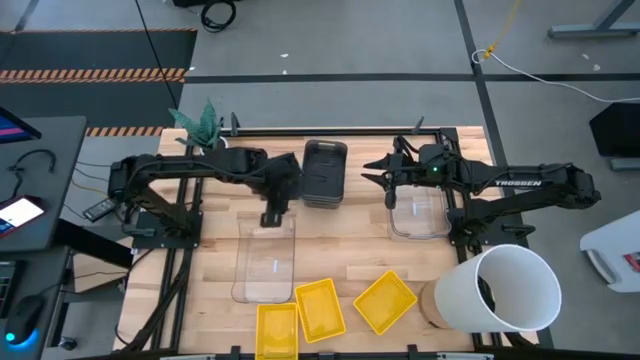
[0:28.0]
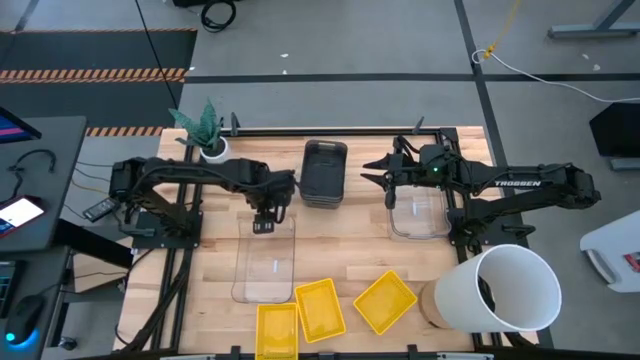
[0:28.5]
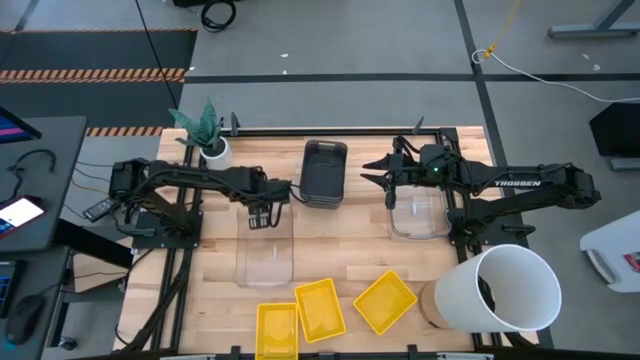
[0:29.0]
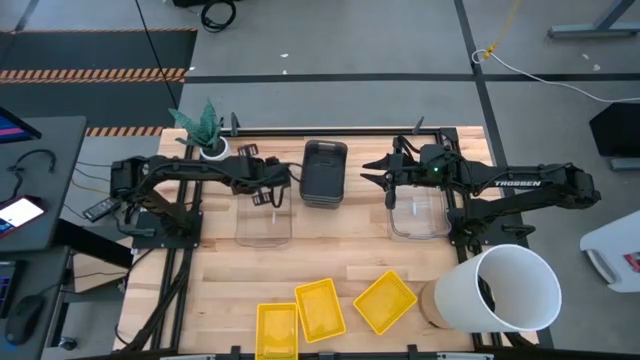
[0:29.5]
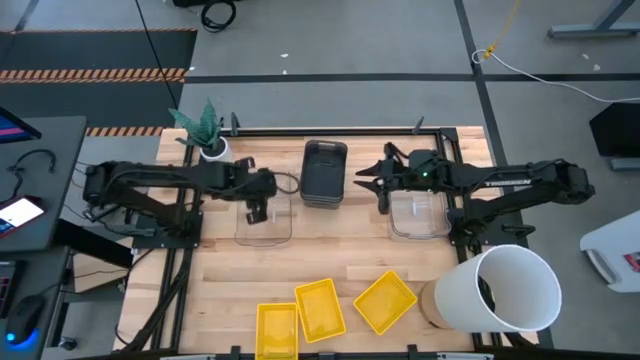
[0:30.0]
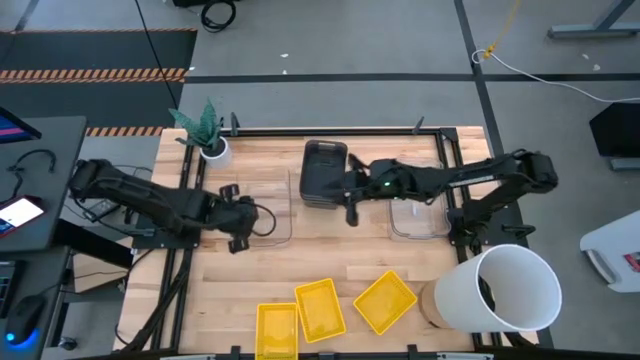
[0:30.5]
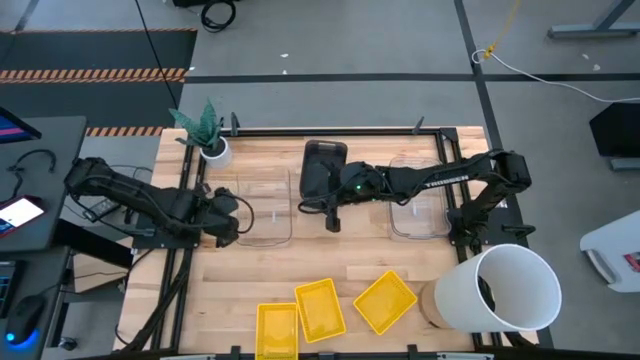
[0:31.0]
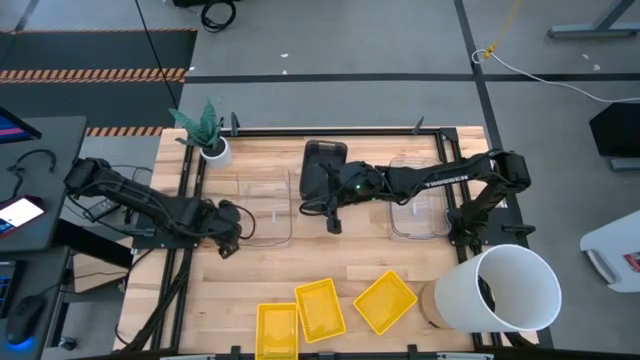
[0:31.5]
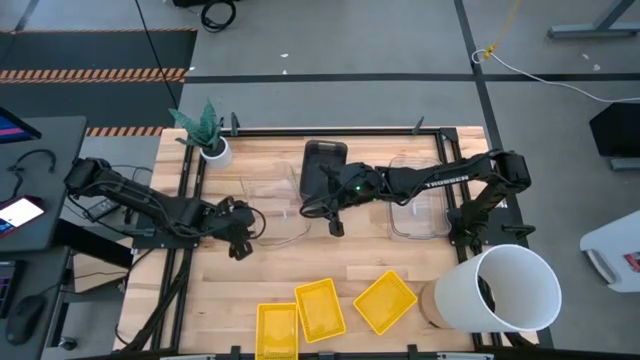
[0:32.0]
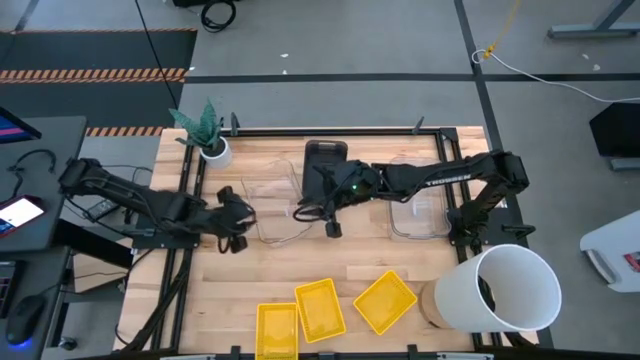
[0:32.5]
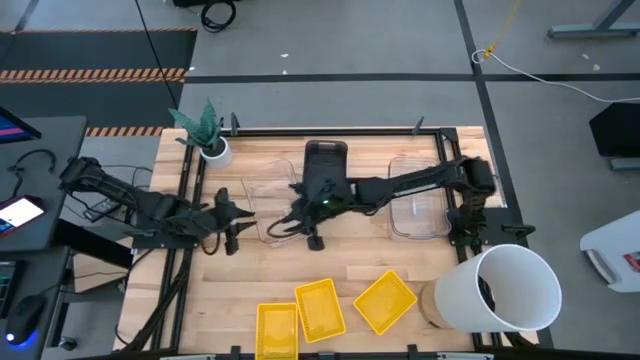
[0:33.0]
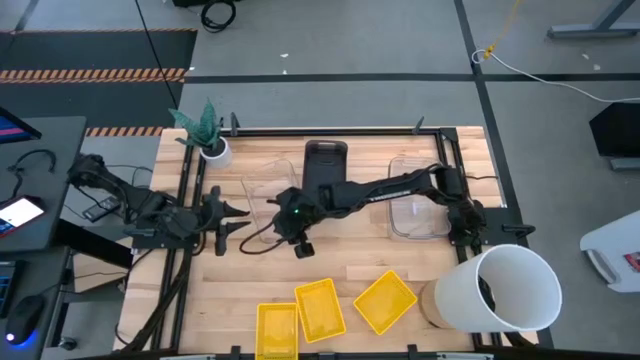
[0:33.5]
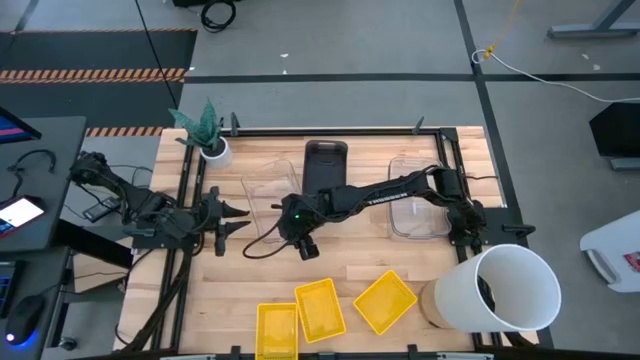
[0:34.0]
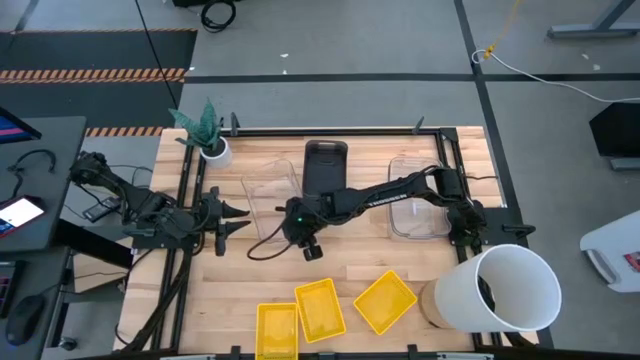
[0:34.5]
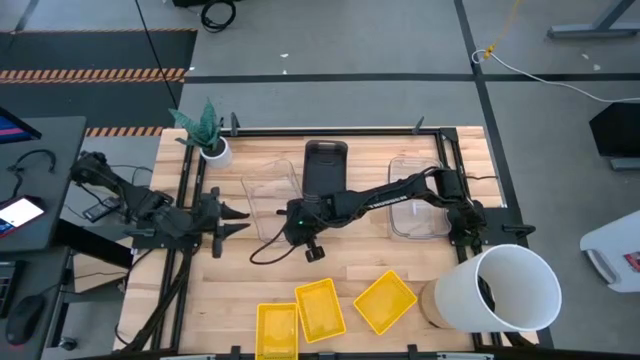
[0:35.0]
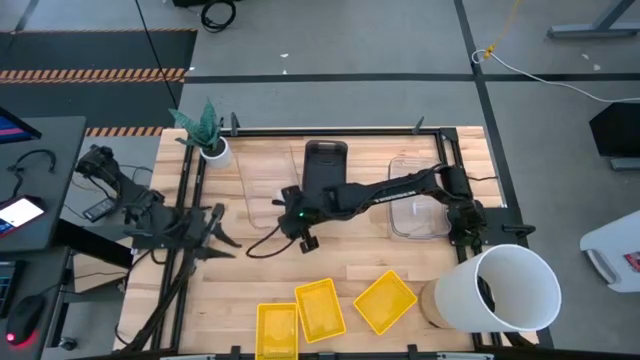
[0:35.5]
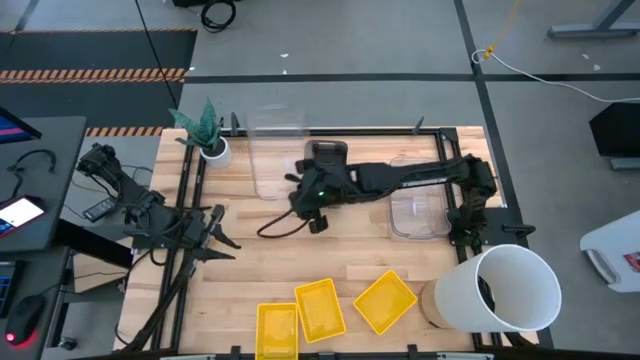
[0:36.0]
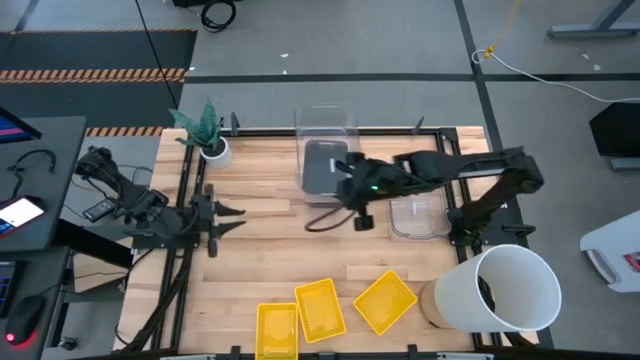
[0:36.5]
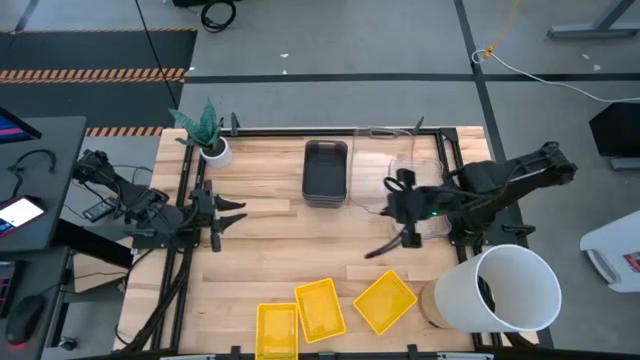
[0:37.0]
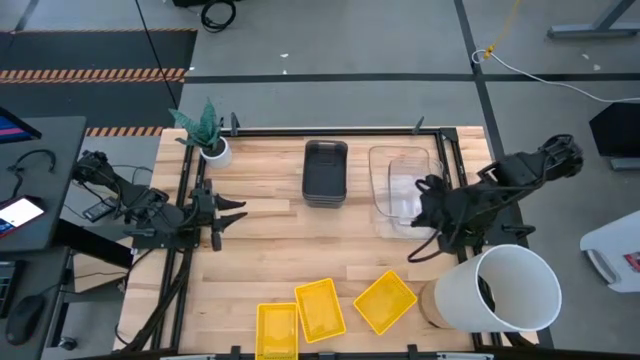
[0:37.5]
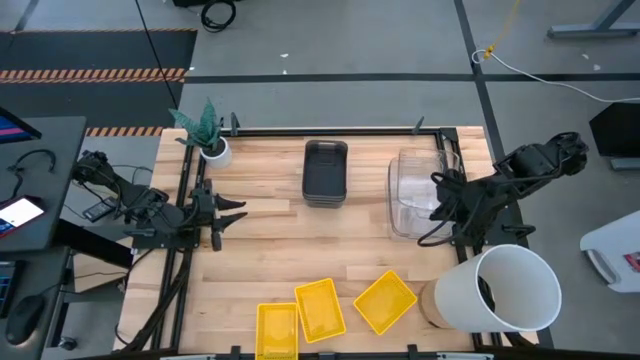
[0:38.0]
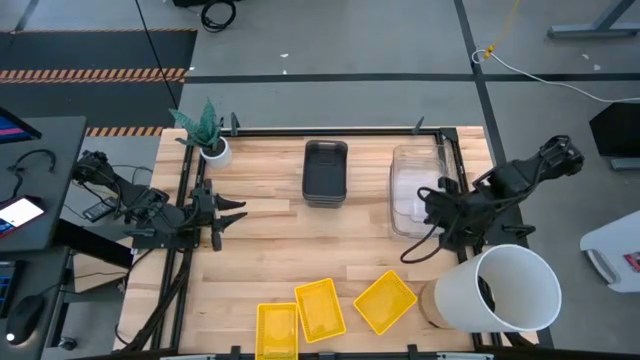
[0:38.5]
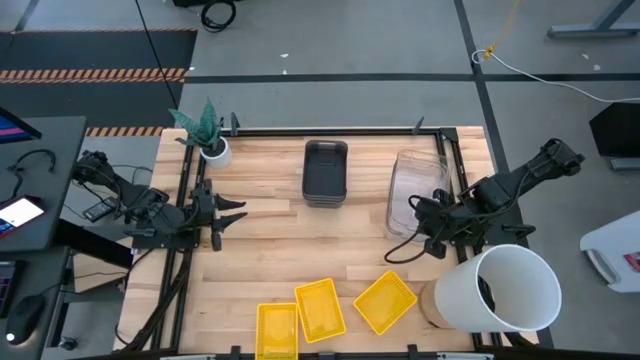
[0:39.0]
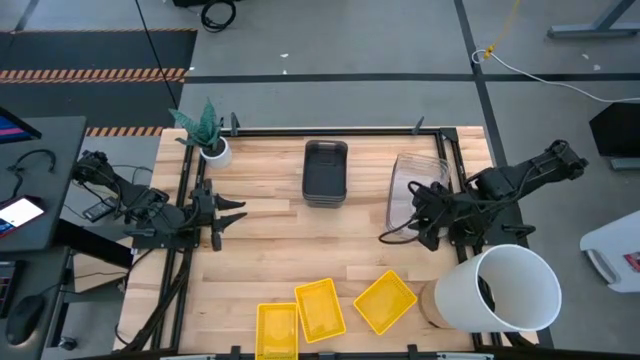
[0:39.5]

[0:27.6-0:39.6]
Stack the transparent bin on top of the stacked transparent bins

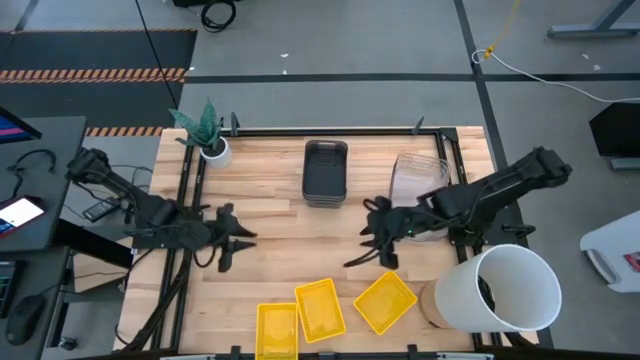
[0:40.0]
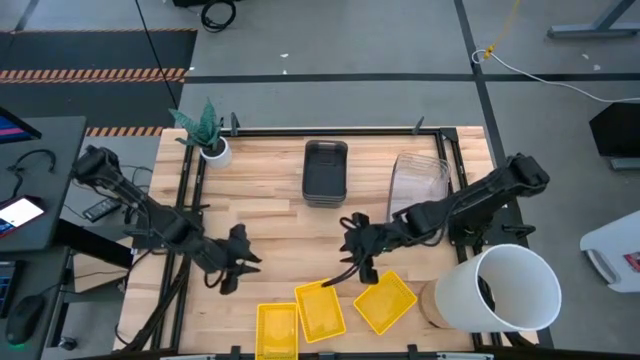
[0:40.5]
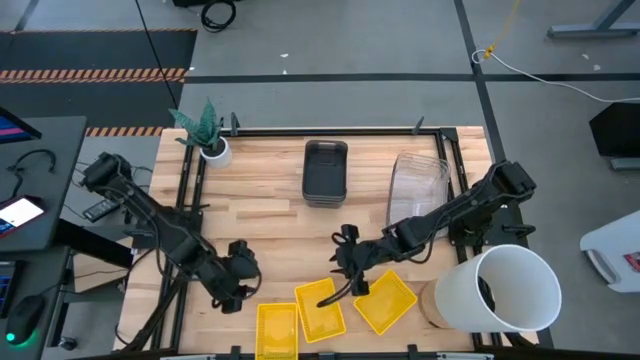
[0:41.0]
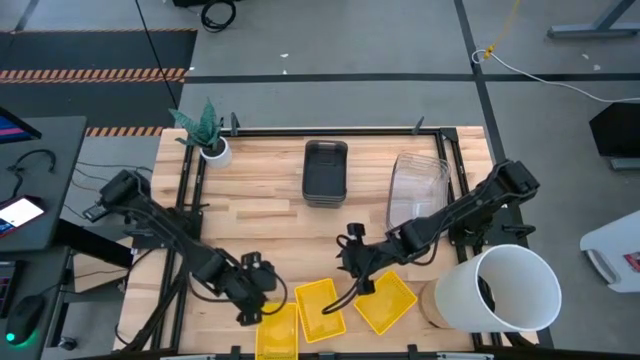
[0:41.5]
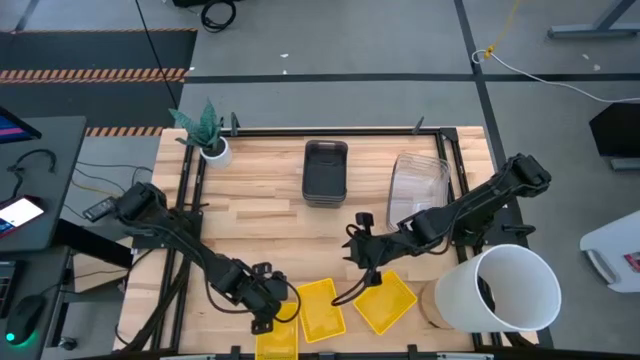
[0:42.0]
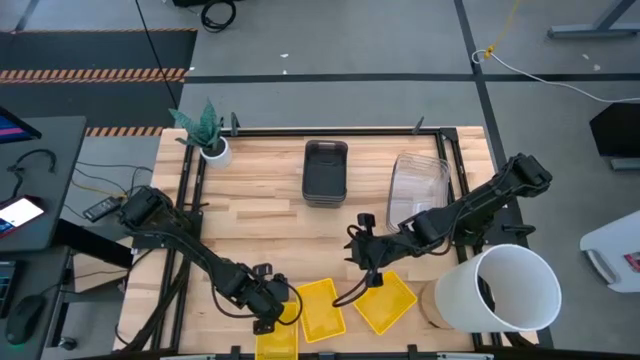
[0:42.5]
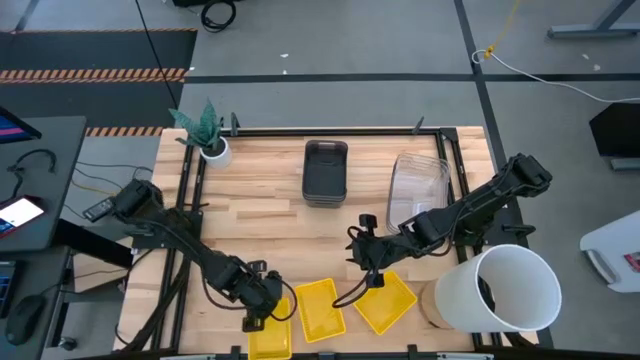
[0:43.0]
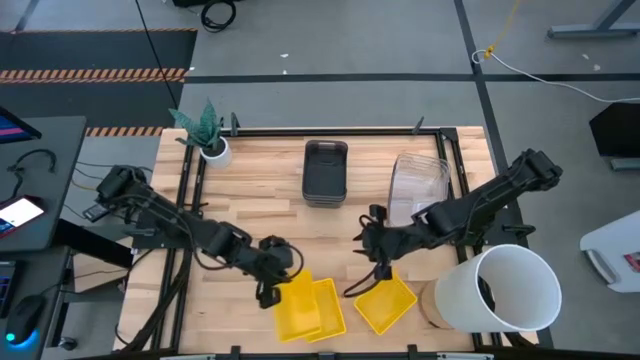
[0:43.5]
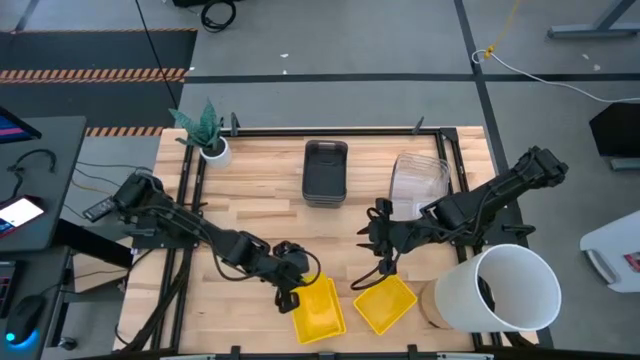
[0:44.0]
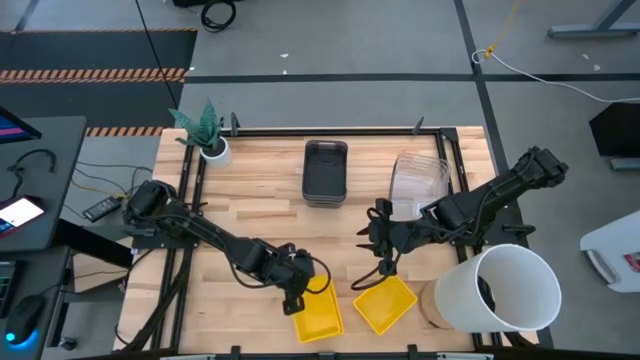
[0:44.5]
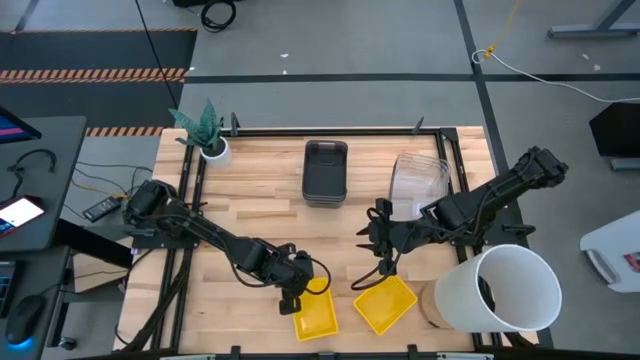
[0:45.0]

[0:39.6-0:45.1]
Stack the left yellow bin on top of the middle yellow bin

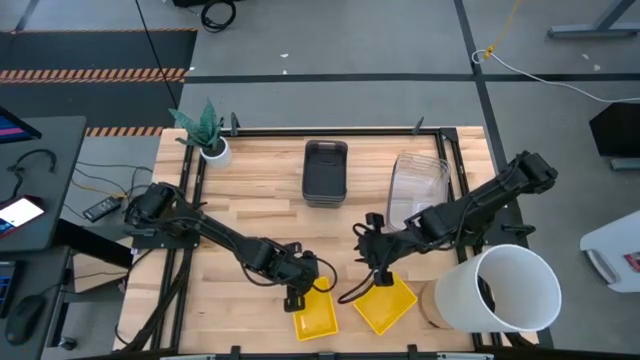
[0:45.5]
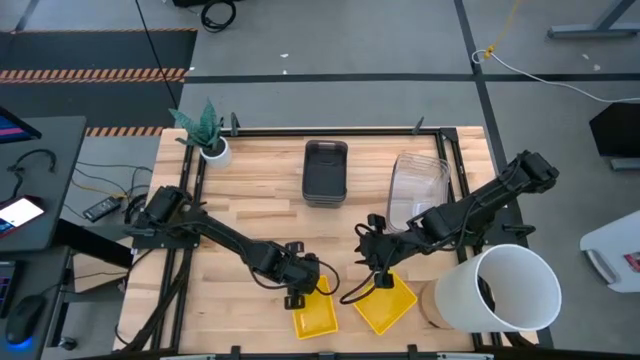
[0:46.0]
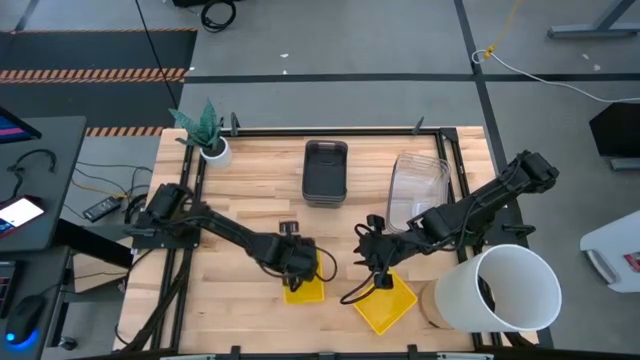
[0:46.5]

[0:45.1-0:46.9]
Adjust the left stacked yellow bins

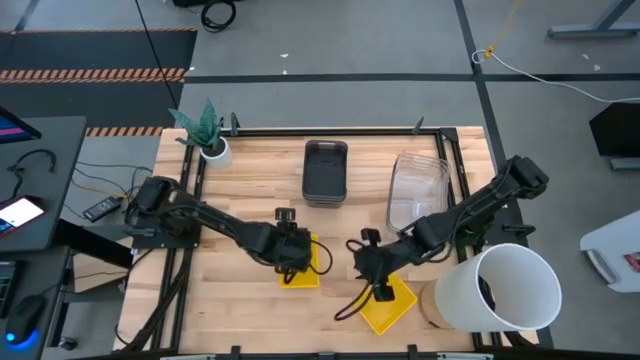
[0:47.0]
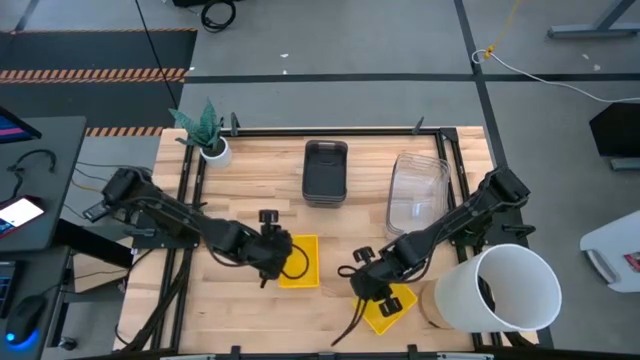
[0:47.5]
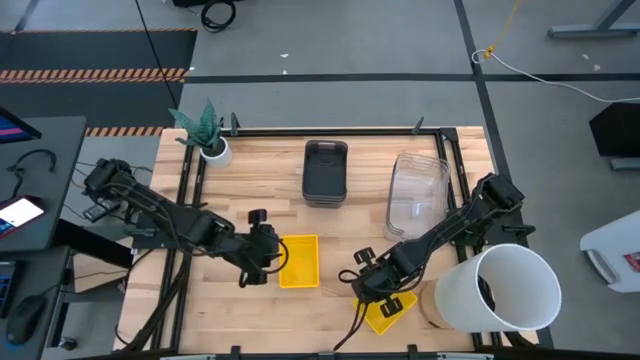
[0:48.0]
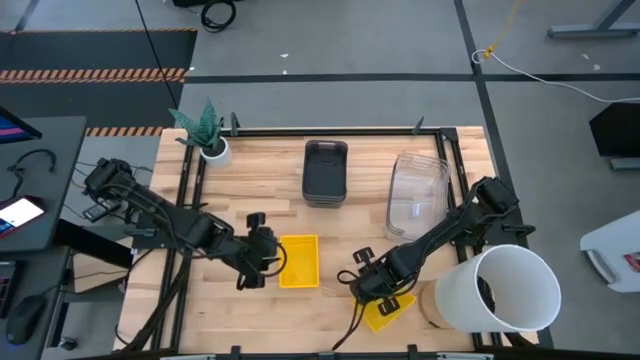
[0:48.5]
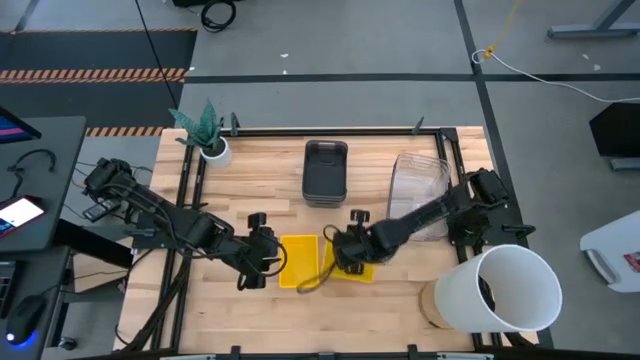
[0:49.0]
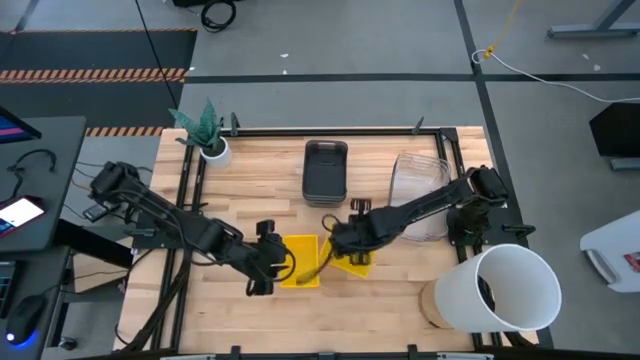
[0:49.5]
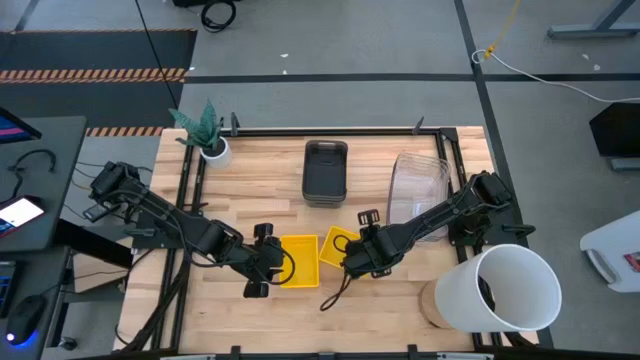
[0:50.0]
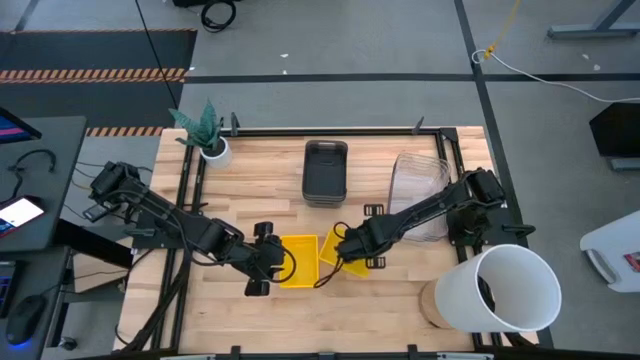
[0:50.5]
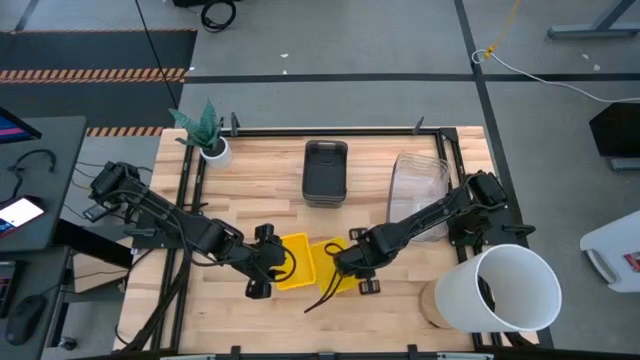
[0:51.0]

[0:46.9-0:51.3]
Adjust the right yellow bin
